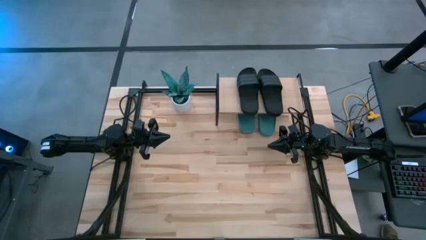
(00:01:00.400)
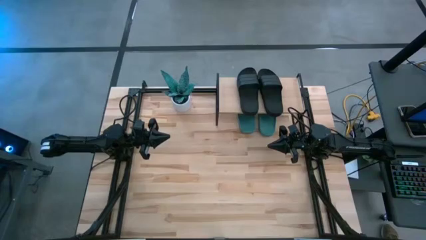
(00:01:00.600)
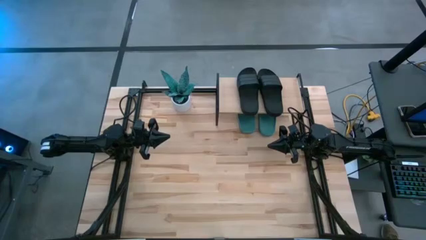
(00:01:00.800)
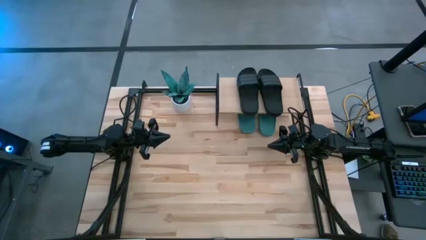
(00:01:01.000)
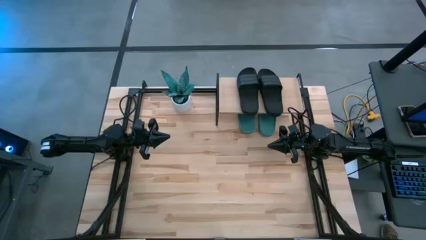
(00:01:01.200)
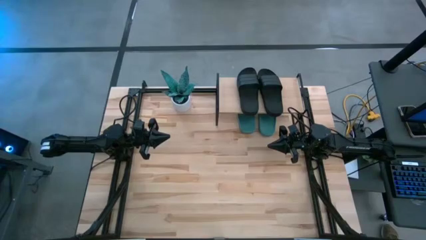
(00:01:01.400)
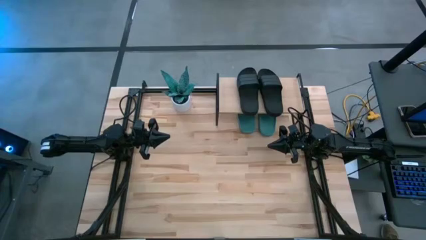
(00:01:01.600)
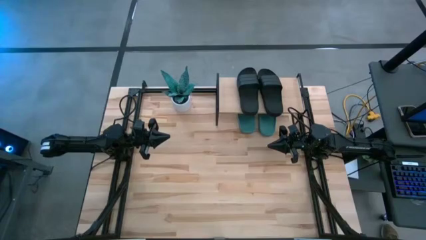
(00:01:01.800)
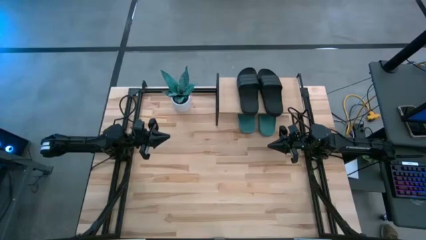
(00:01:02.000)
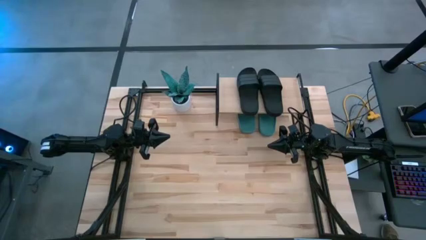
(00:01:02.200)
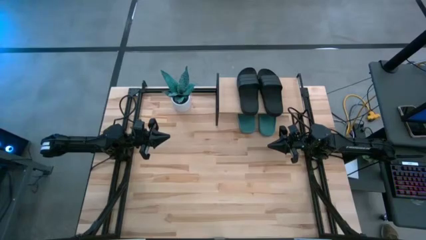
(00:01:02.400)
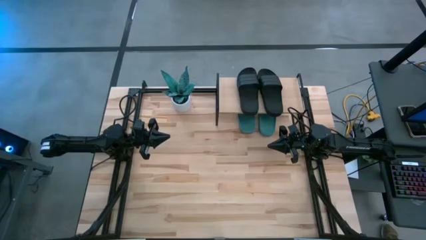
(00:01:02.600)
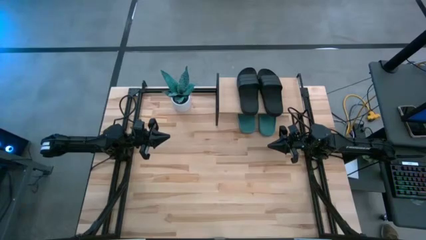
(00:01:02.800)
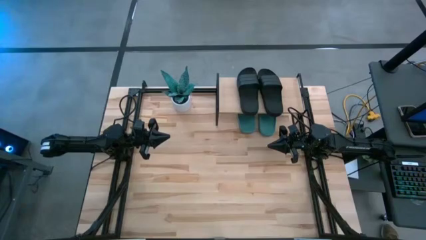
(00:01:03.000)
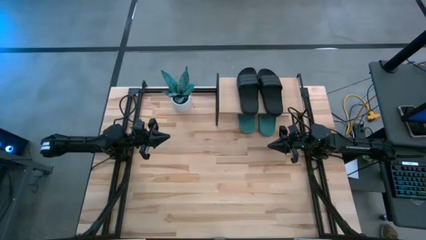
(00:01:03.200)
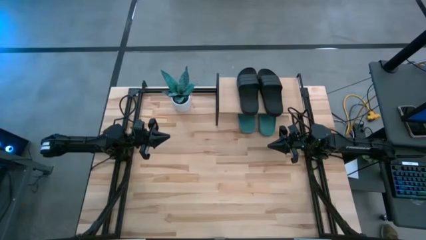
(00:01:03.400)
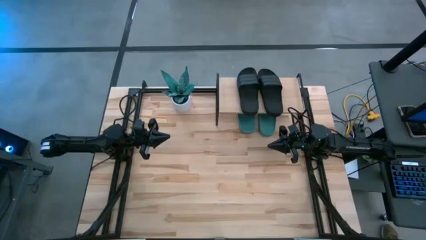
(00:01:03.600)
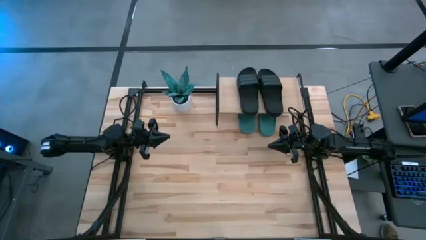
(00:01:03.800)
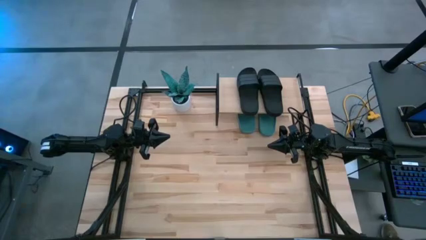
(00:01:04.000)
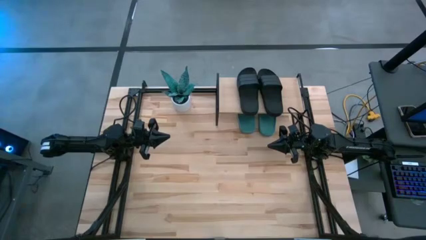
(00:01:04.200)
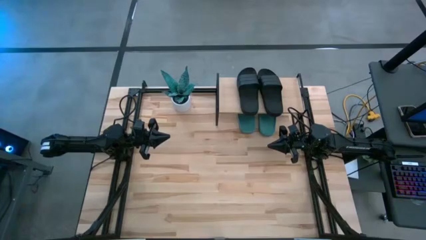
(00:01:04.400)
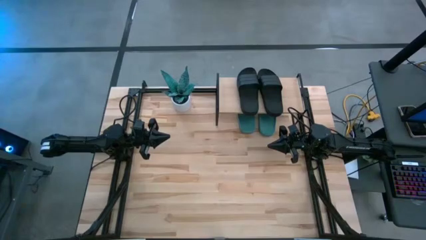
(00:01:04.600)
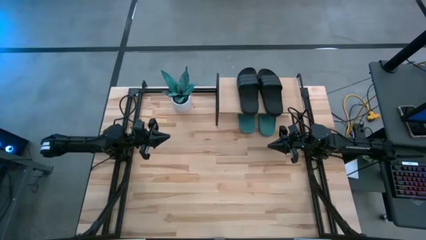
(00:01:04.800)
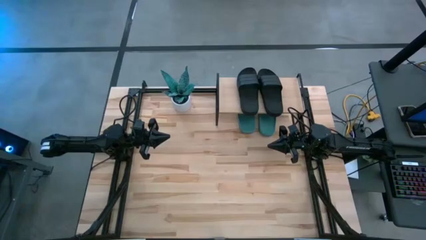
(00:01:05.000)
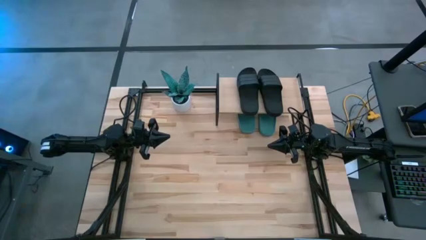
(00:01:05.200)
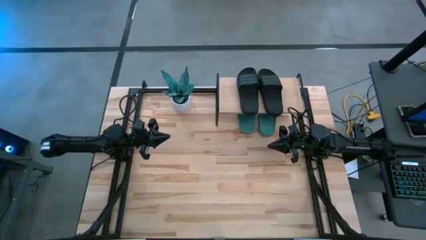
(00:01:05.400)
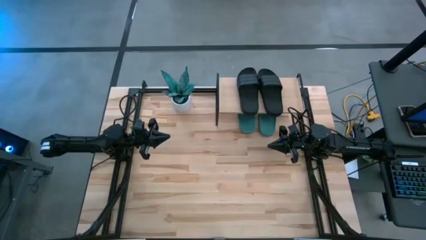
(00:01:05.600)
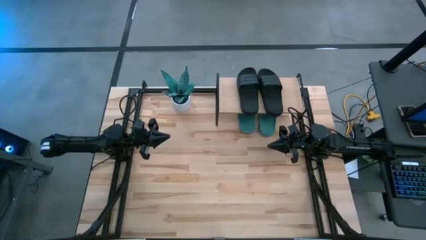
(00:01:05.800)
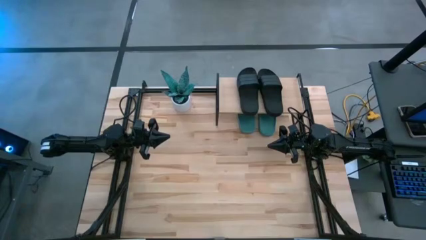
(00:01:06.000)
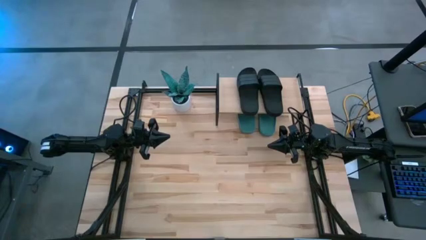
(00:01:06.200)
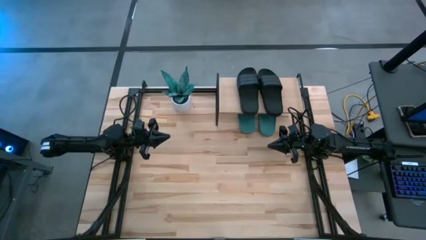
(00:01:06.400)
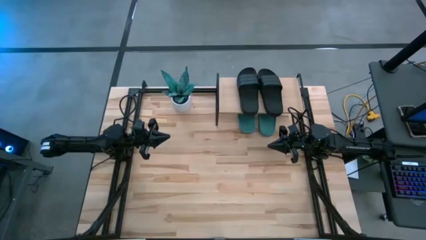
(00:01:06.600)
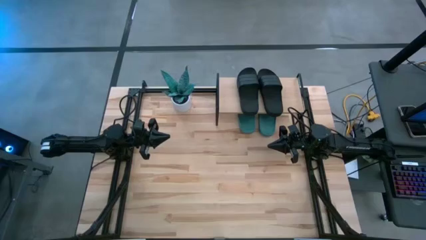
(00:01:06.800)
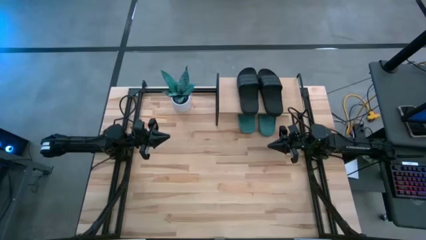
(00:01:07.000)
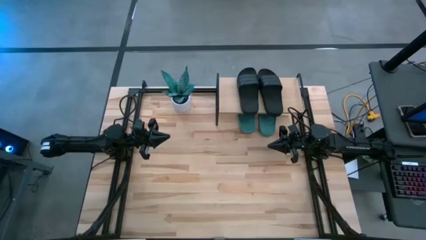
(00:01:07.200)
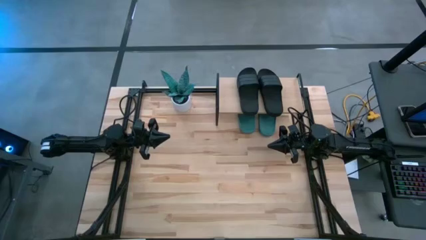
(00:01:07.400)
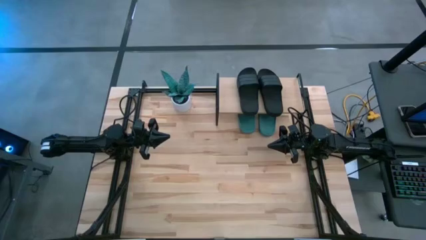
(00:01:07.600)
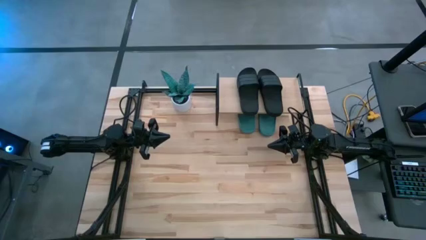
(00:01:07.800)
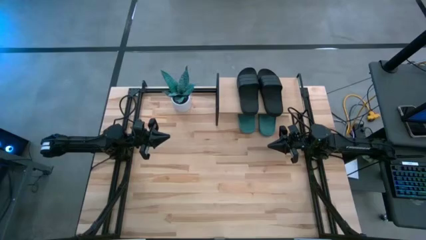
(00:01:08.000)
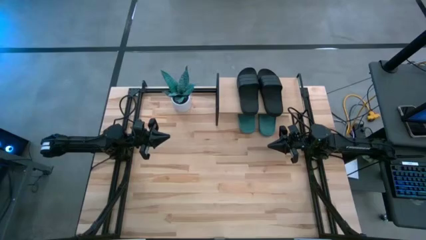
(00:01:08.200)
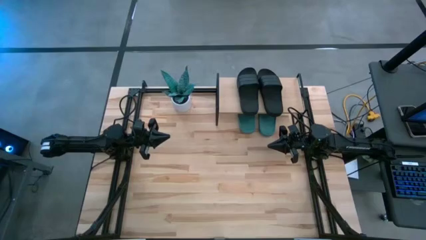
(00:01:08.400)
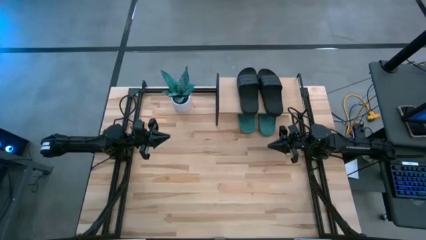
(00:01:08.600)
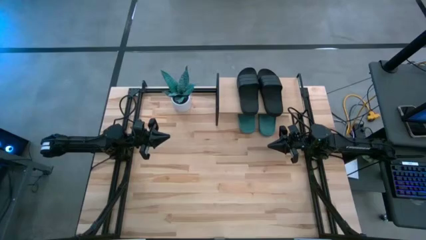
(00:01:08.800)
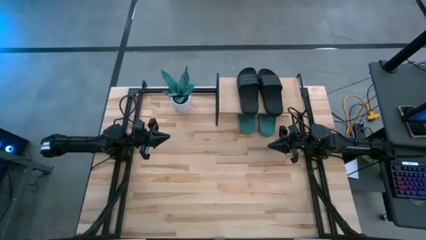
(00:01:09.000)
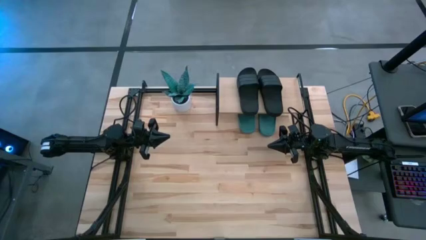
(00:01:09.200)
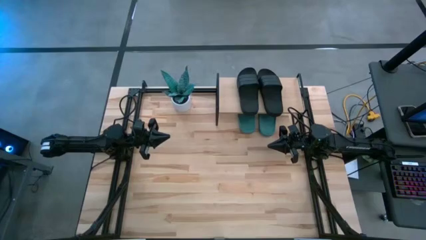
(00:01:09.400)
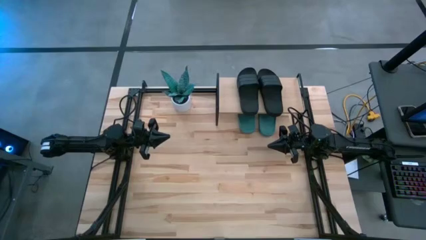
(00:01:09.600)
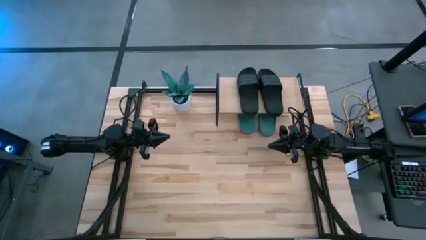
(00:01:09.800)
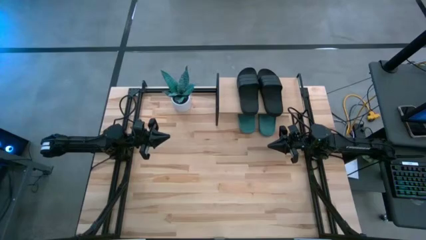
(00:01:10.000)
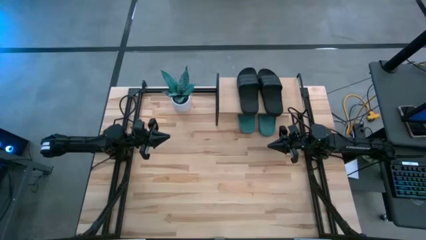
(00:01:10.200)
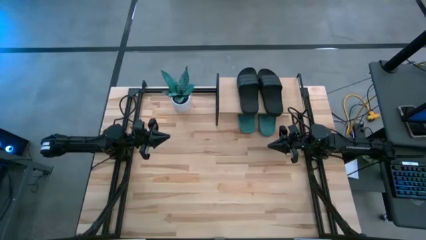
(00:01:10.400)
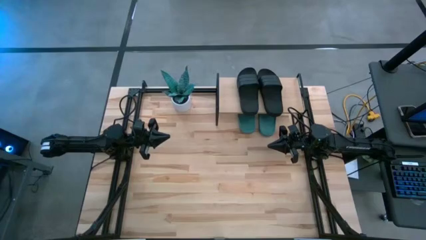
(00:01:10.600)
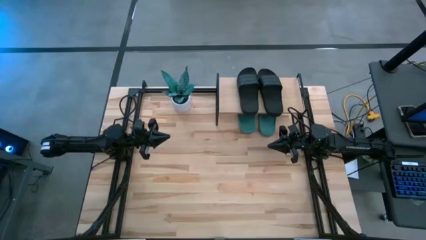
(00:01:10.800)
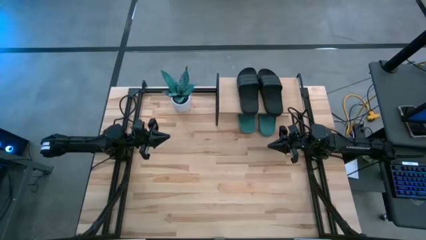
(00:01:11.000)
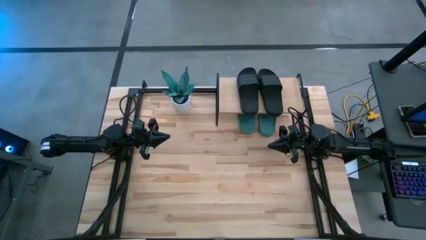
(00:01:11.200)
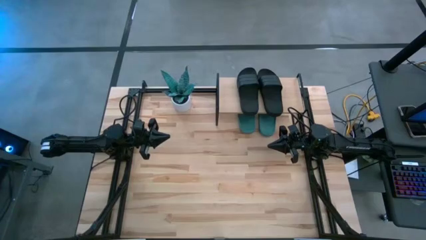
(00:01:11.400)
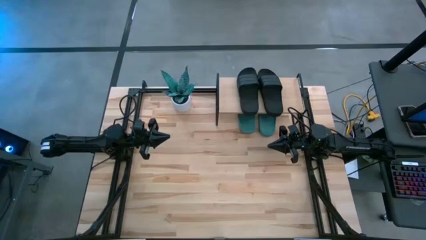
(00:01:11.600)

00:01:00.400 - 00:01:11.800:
Task: Pick and place slides into the shelf
Return to Home Position

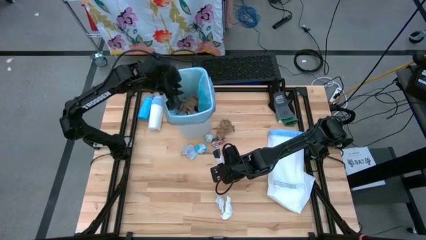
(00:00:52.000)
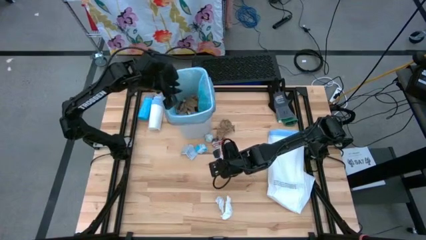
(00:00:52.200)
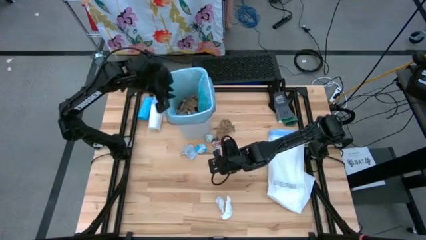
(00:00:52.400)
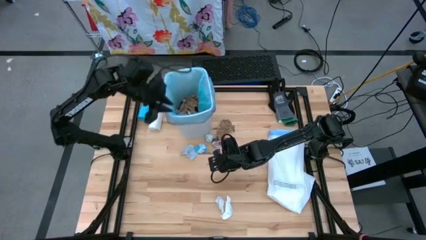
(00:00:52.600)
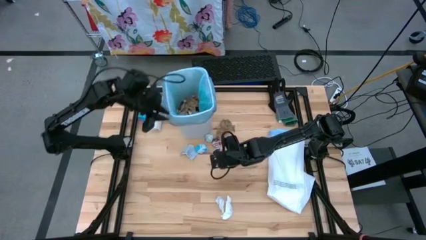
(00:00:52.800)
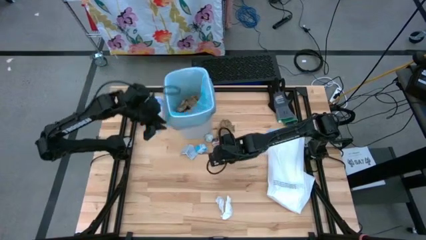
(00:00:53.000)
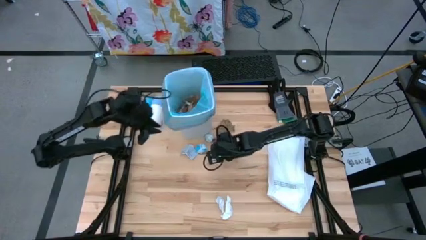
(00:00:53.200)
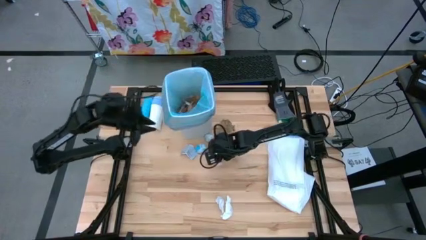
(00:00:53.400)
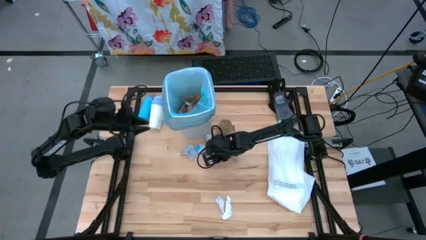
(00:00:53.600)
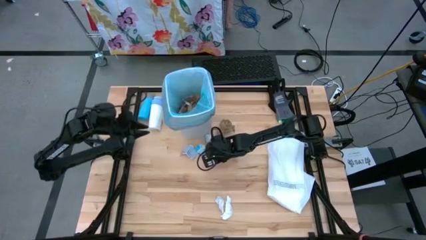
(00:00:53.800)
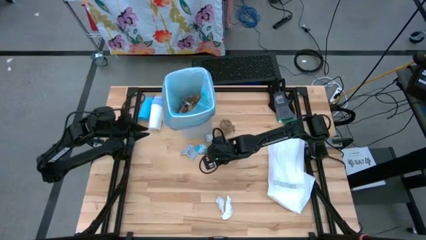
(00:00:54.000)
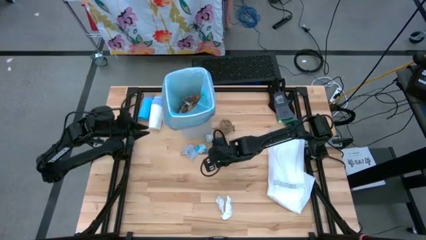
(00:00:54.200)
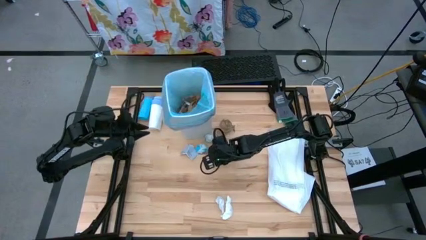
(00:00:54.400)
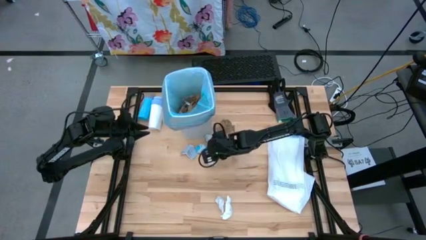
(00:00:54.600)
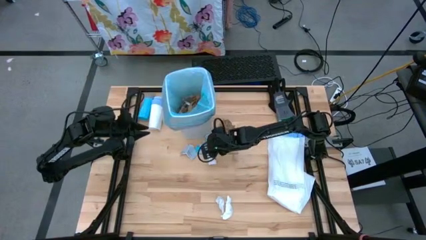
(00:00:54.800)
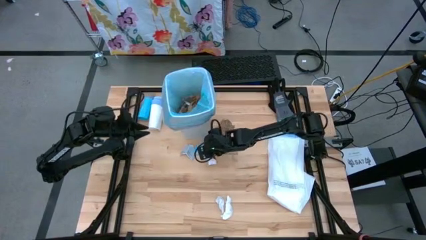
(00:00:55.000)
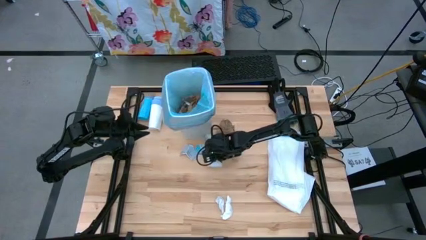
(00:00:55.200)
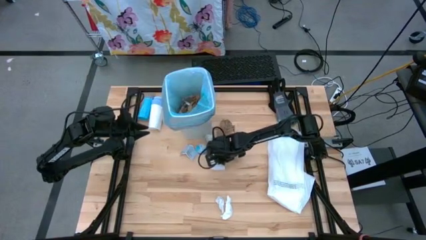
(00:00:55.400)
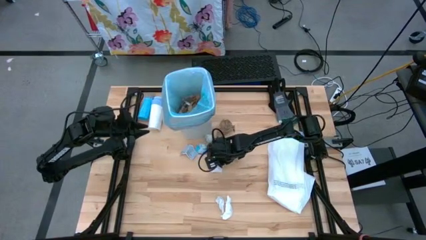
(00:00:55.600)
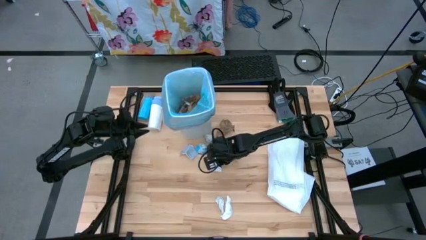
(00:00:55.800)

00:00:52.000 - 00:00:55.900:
Task: place trash/remove bag and relplace
Put the white paper into the white trash bin

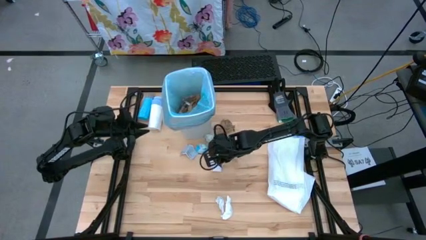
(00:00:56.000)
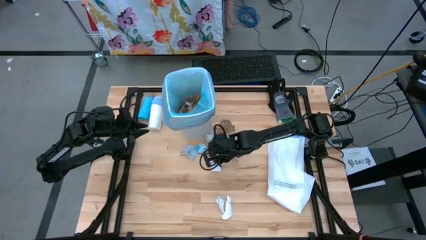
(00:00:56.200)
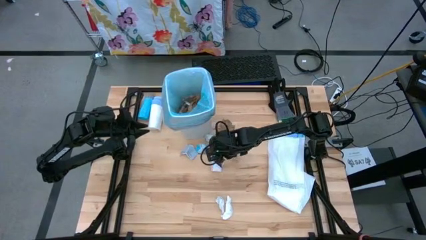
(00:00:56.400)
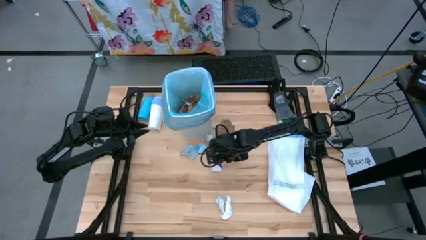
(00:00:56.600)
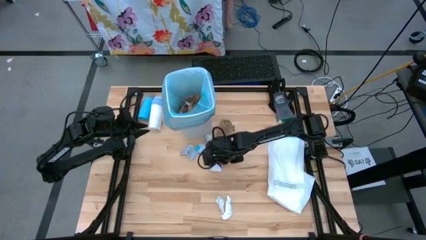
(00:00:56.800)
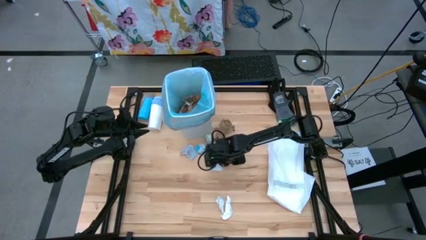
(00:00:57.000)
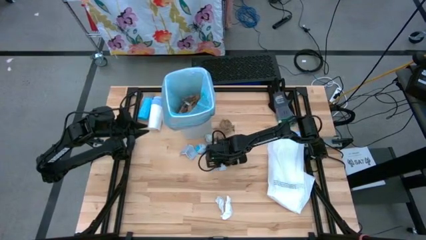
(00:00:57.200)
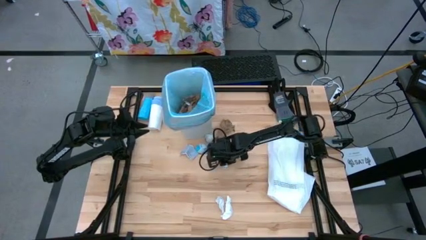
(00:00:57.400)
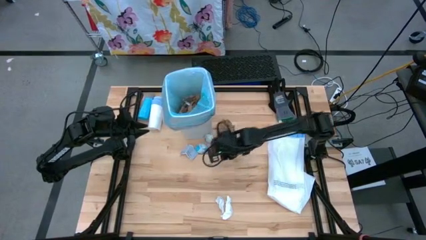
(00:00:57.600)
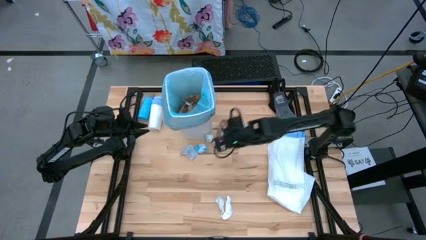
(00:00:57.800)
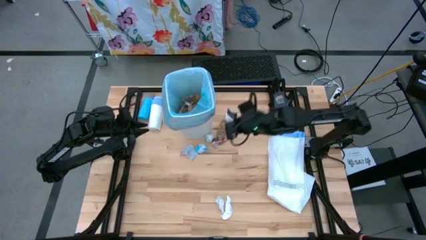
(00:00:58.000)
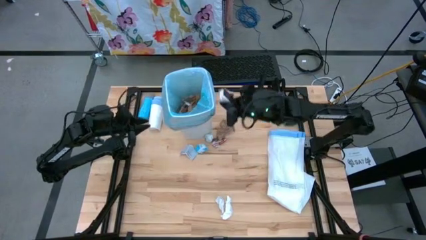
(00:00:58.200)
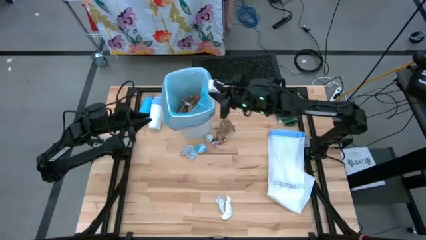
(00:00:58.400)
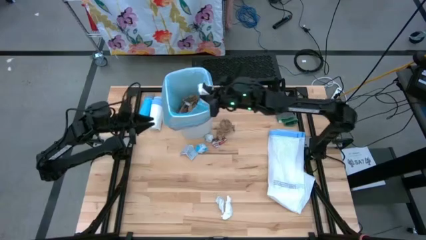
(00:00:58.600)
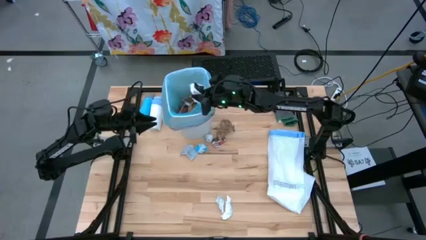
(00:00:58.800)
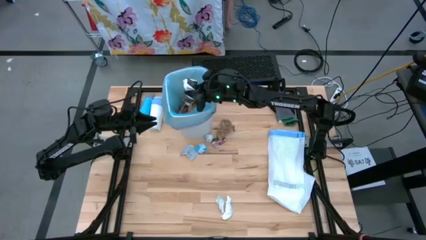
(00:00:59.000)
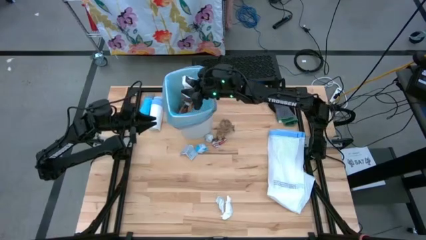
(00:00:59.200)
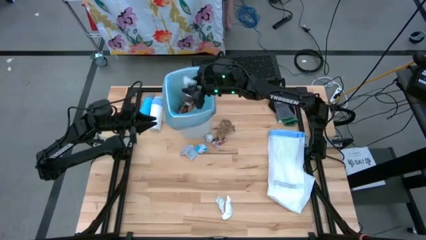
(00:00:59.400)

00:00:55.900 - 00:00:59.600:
Put the white paper into the white trash bin
